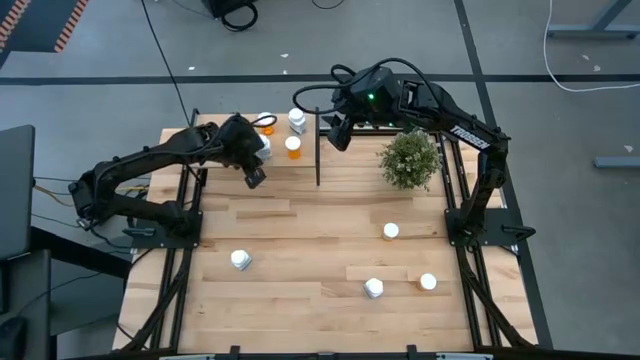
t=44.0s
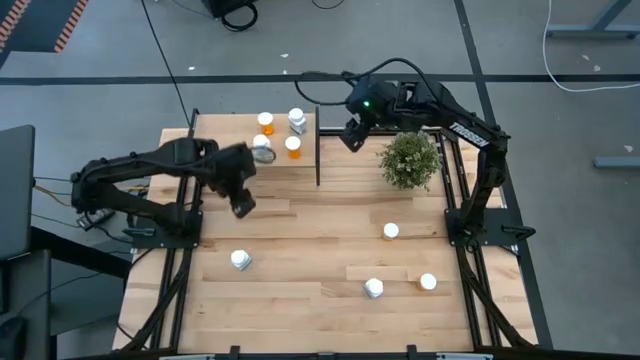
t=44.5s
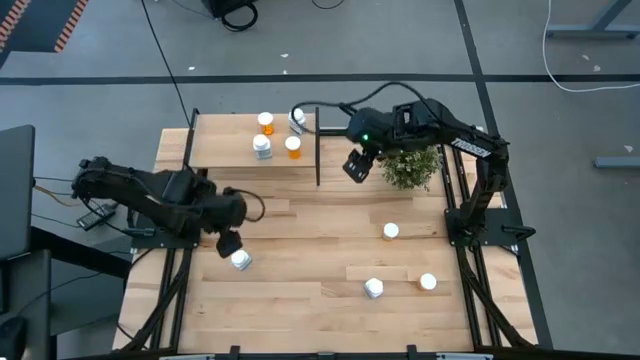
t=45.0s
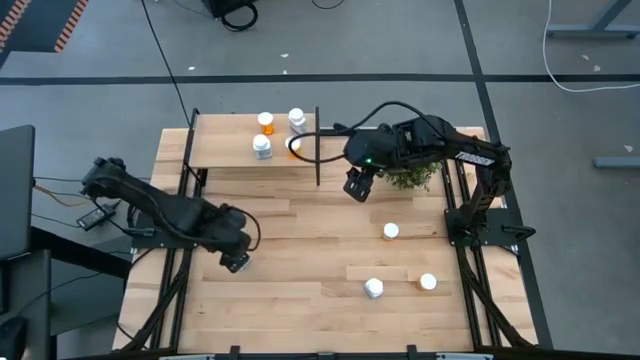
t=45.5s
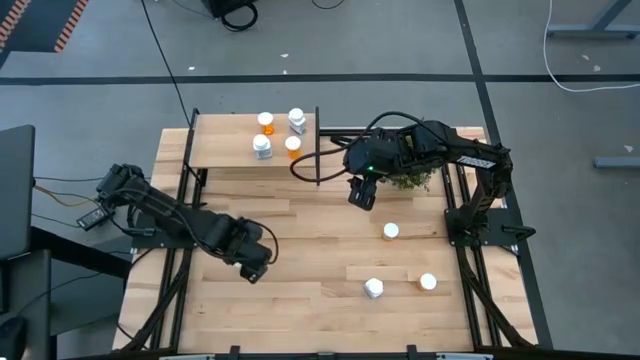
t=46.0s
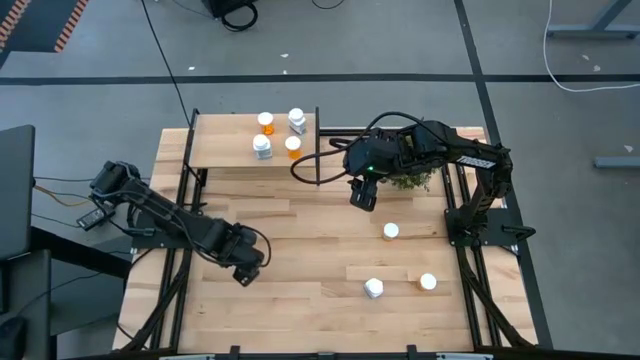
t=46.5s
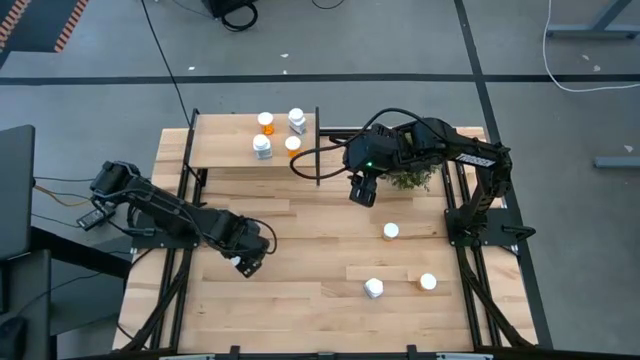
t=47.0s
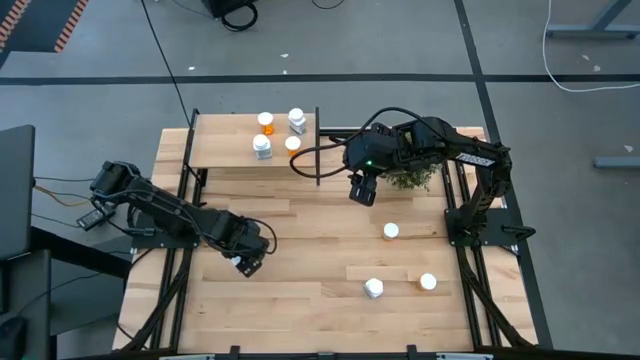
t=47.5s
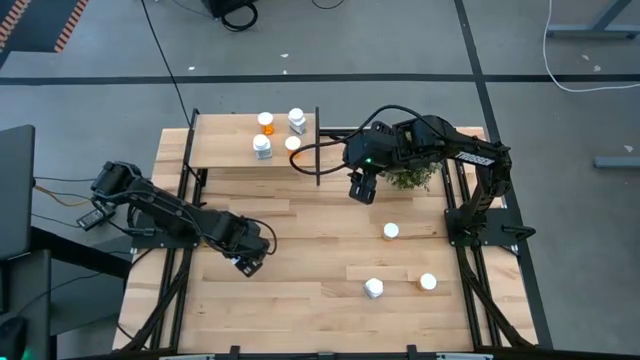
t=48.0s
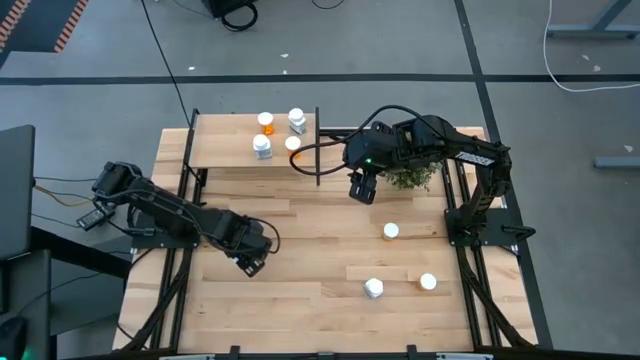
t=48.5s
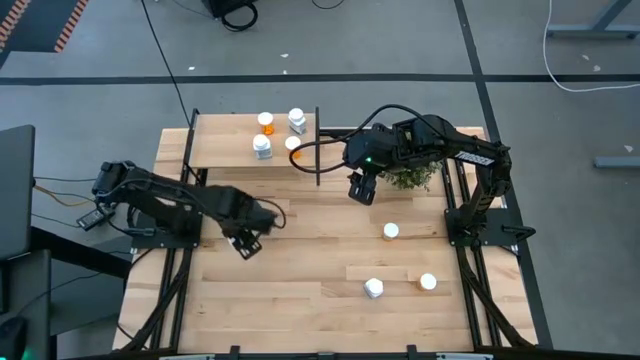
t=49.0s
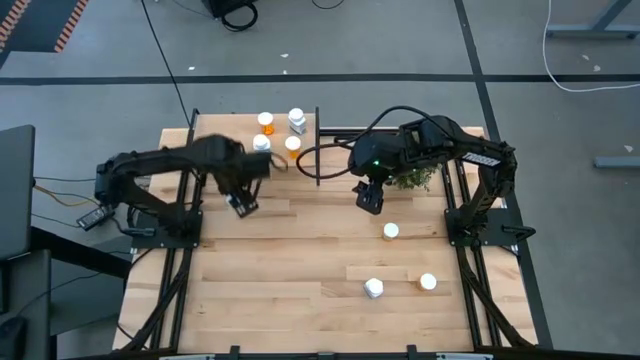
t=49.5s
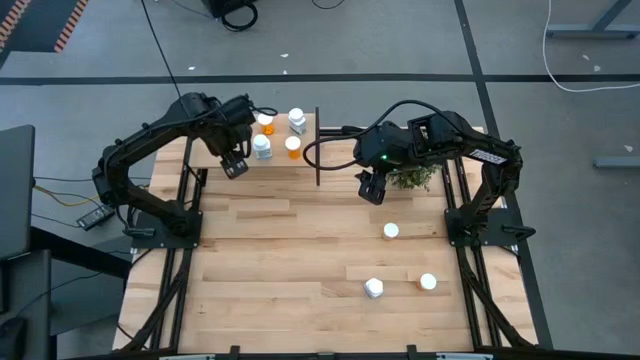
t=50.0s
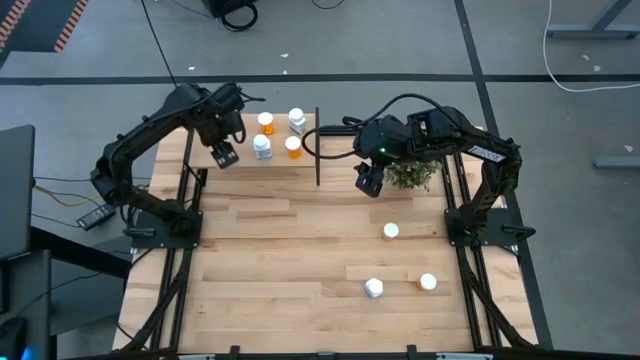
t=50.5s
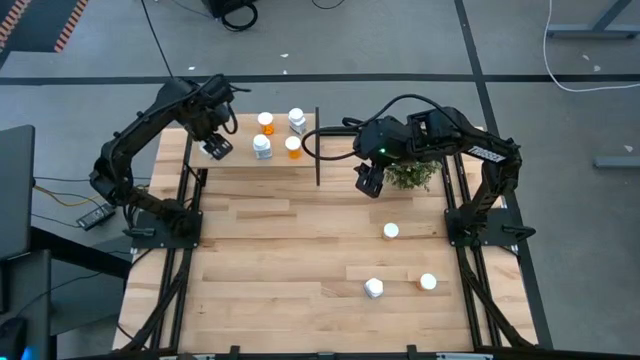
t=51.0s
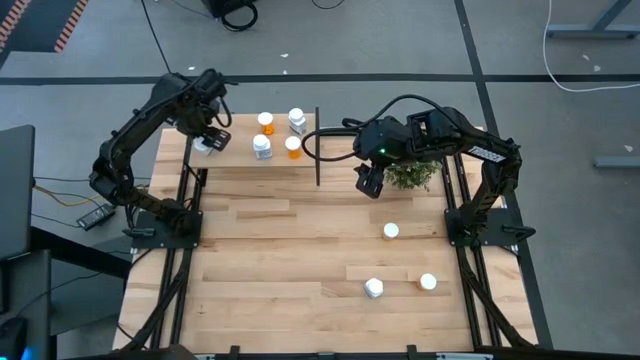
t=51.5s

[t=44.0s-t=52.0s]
Task: Pick and place medicine bottles onto shelf by color
Put the supplement bottle on the shelf

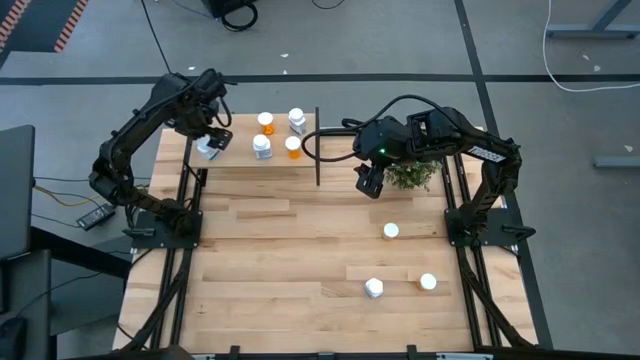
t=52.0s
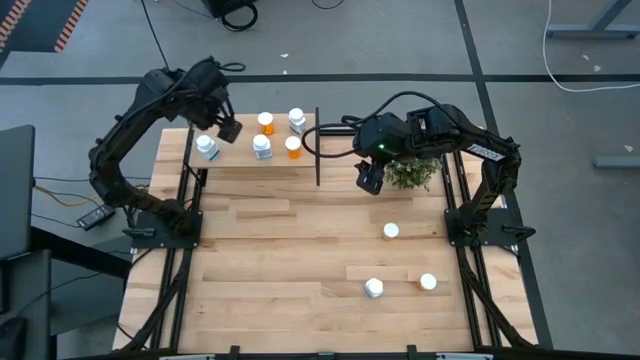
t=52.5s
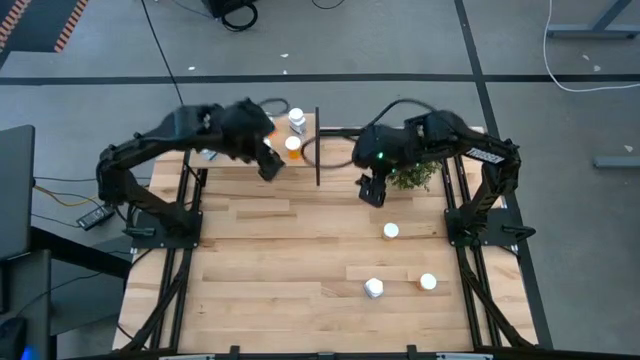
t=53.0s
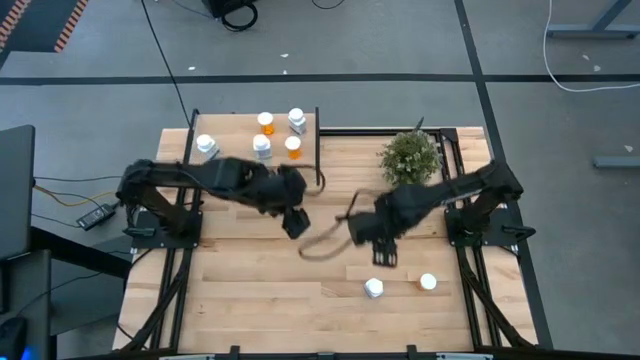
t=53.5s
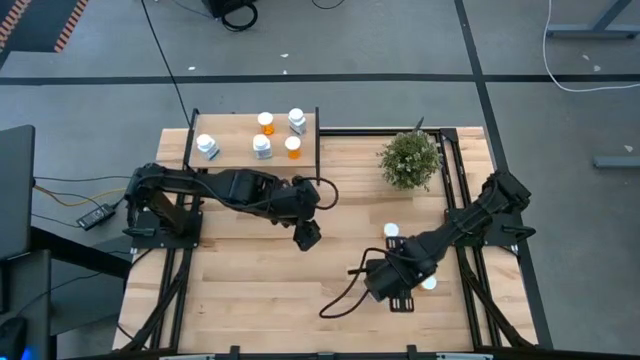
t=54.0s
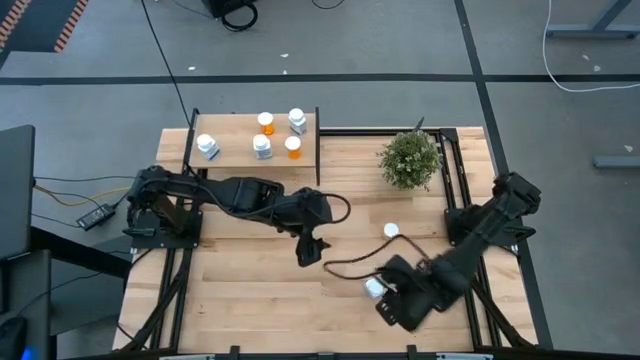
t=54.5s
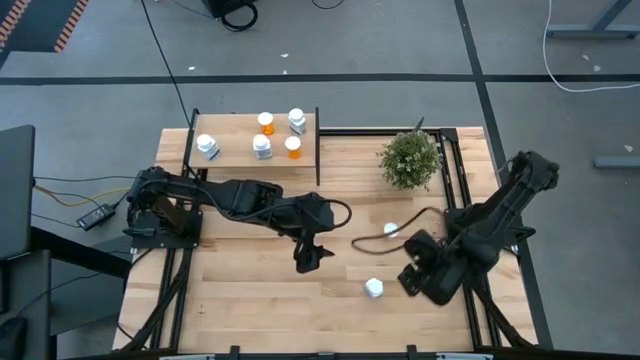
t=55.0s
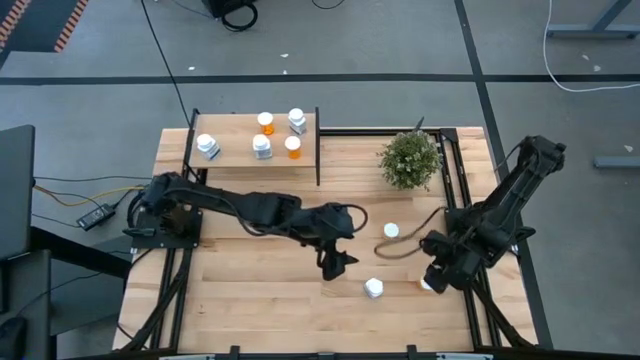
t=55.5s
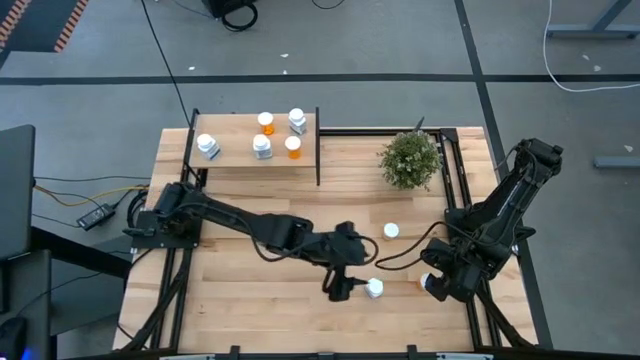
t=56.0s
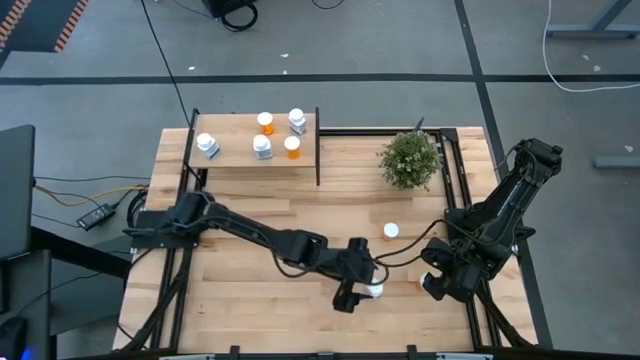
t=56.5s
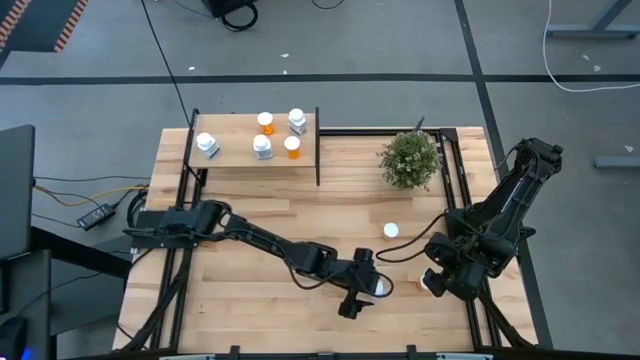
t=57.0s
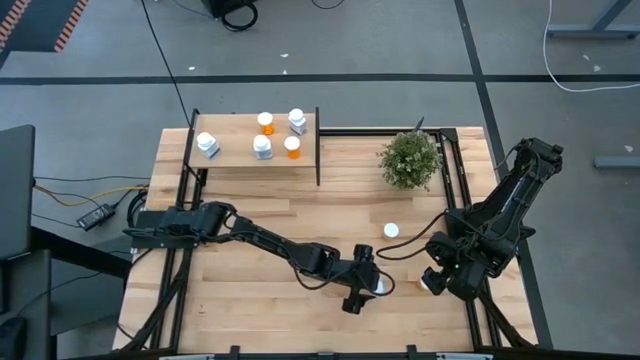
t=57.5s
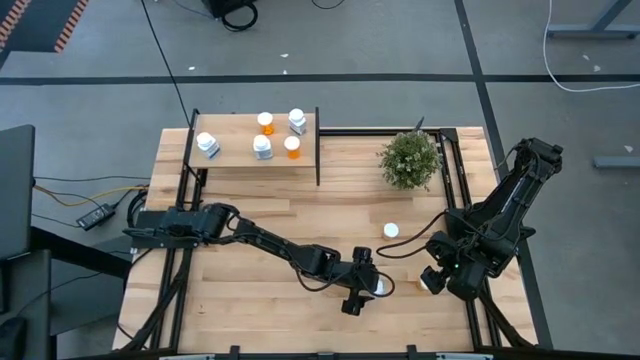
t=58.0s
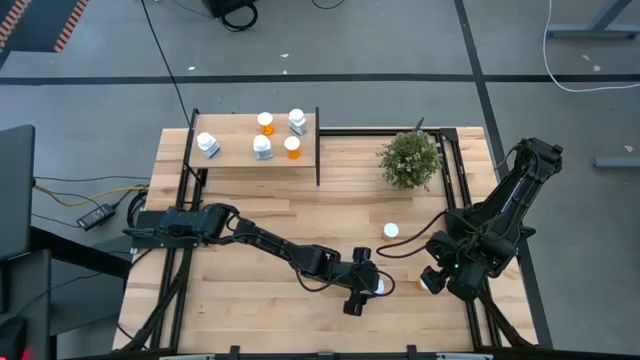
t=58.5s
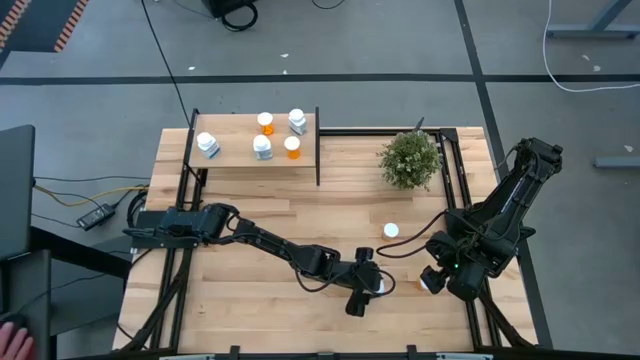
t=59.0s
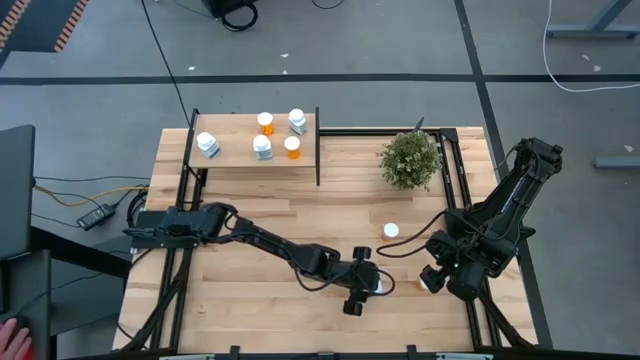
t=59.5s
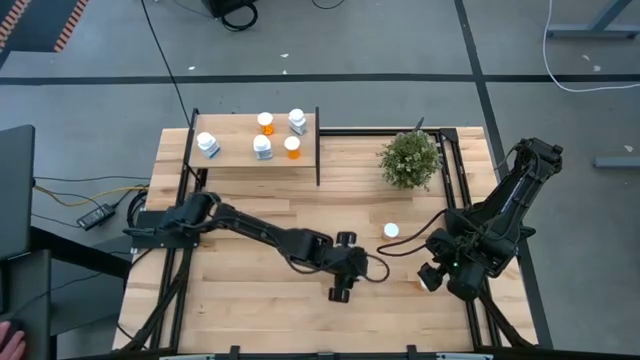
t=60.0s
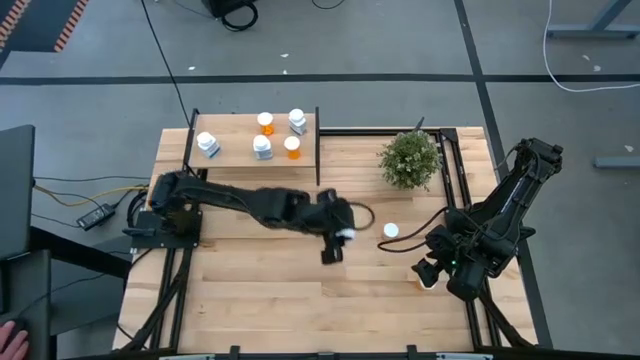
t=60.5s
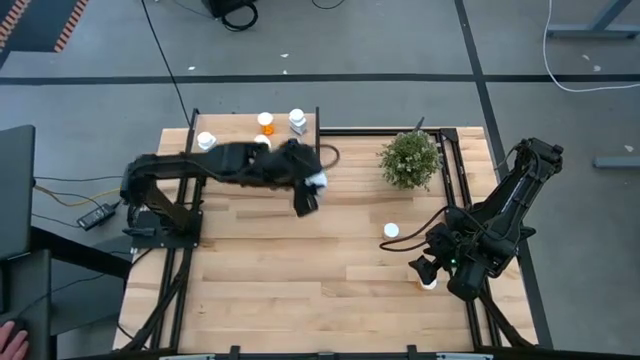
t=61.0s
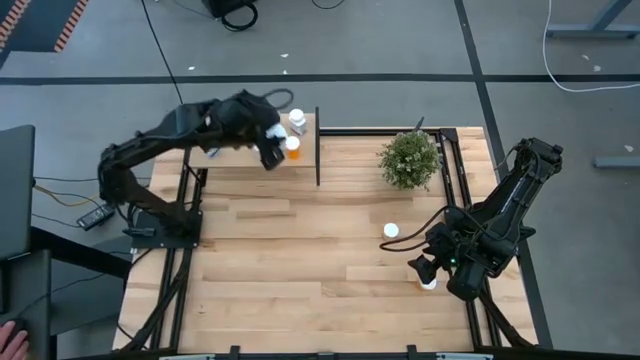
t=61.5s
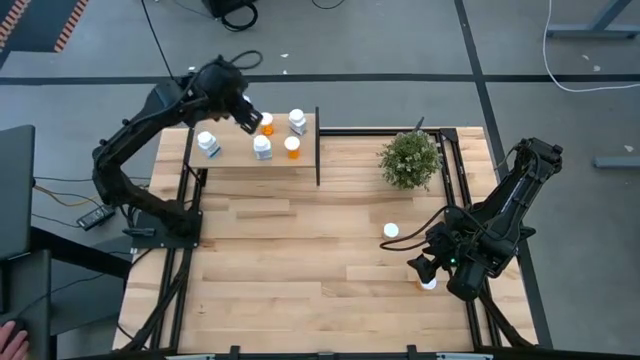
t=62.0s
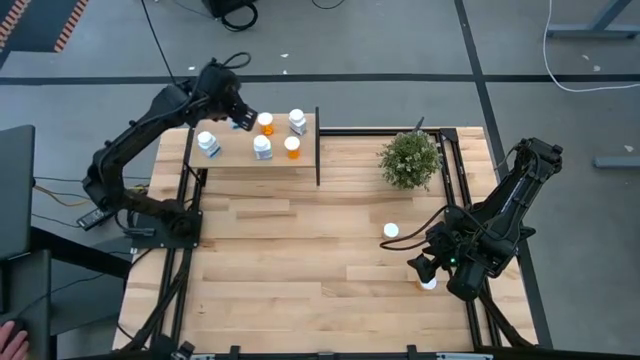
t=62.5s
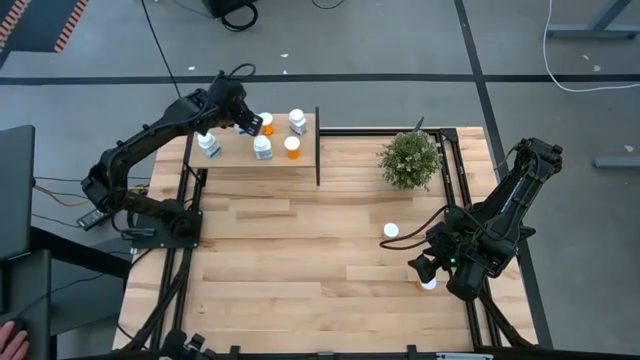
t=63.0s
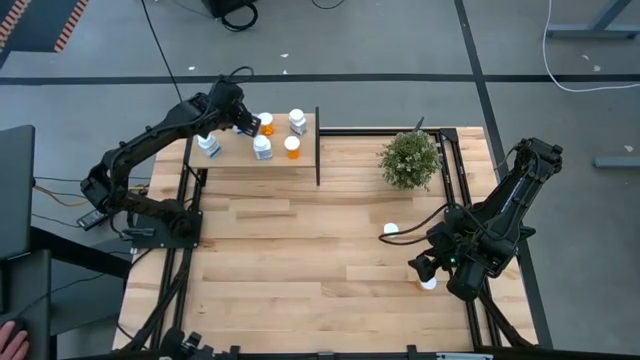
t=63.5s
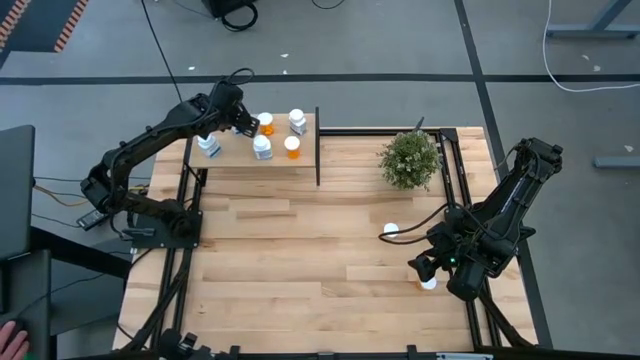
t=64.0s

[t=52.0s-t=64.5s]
Put the supplement bottle on the shelf

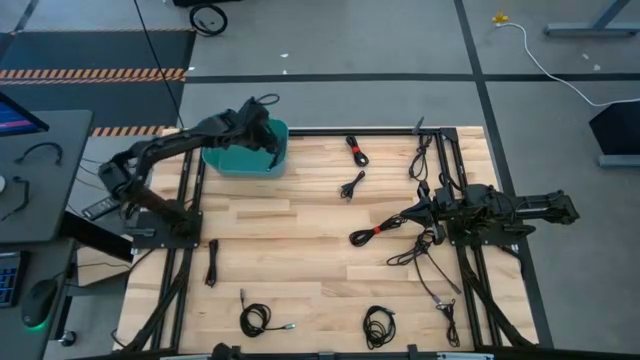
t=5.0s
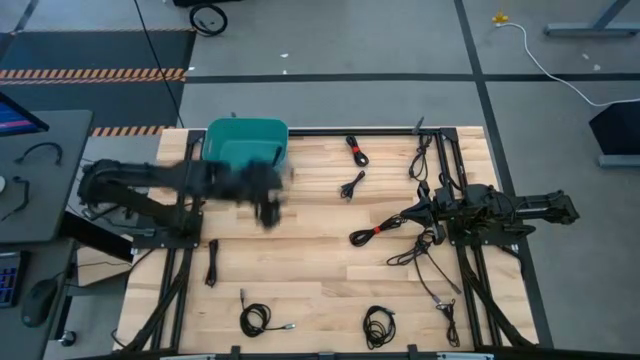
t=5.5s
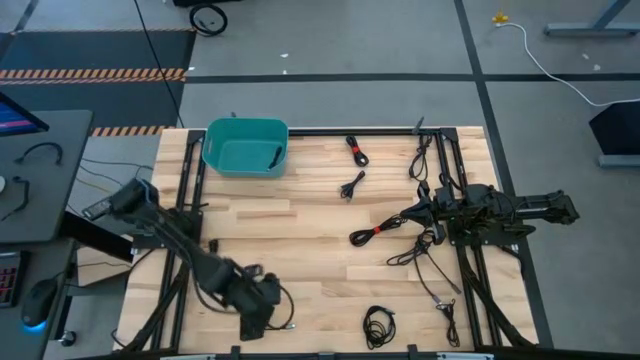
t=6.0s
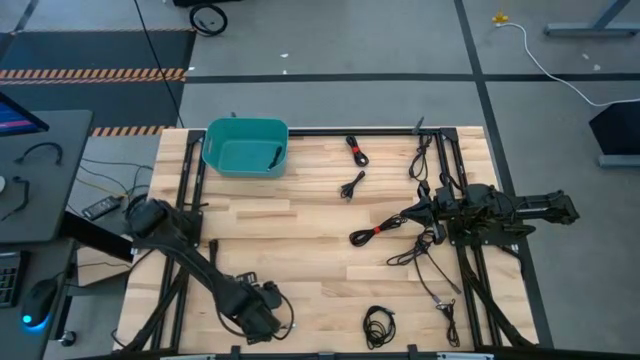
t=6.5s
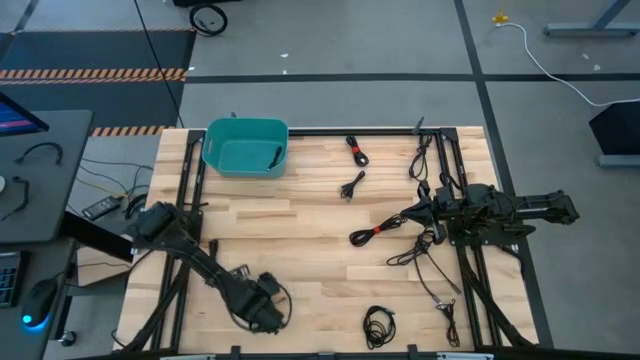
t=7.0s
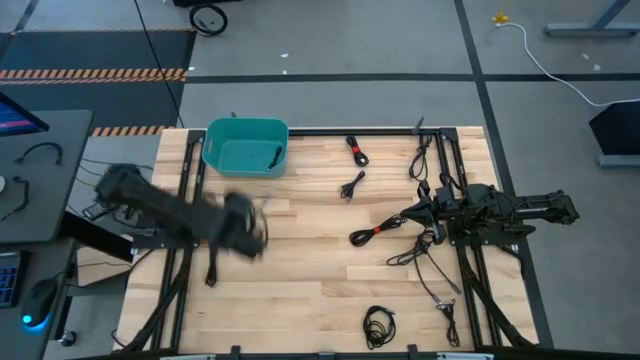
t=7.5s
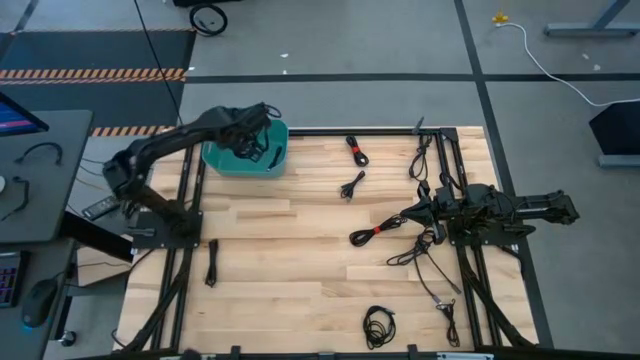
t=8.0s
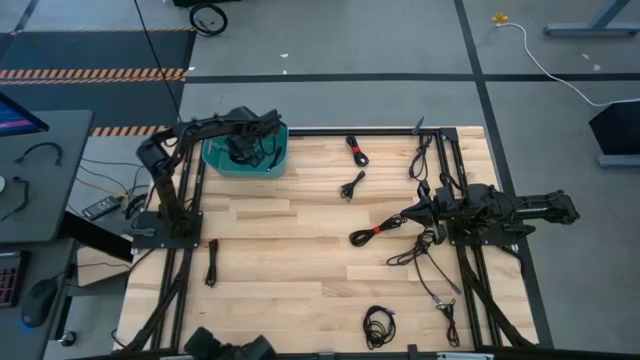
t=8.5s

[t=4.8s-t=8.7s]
Task: Pick and place USB-C Cables
Put the black charger cable into the blue bin
